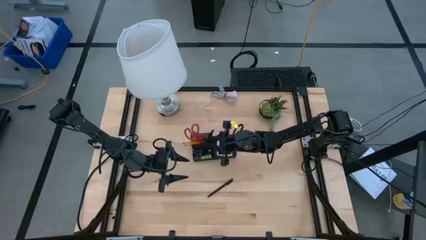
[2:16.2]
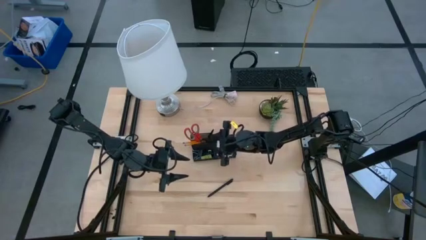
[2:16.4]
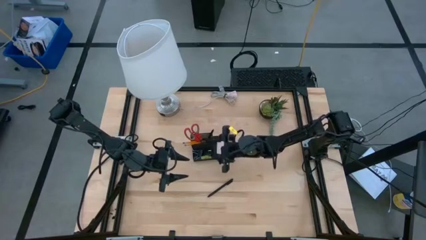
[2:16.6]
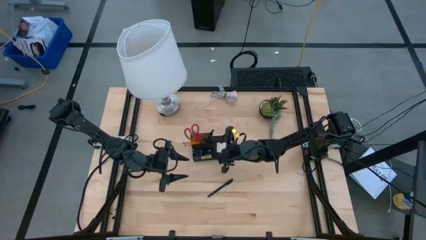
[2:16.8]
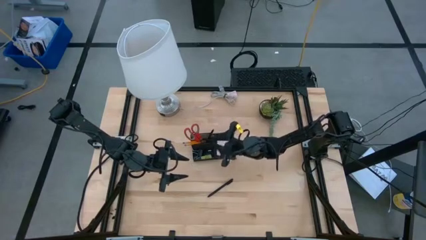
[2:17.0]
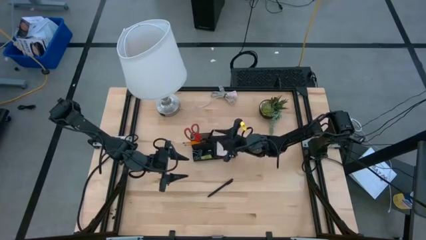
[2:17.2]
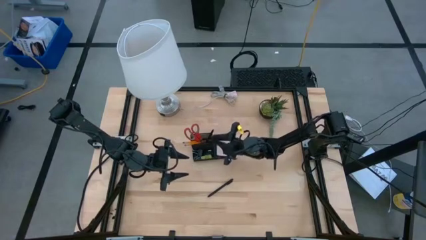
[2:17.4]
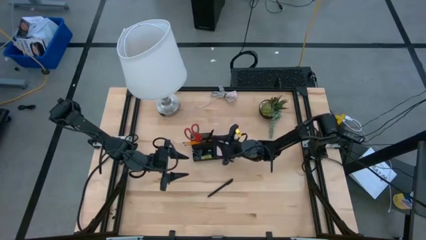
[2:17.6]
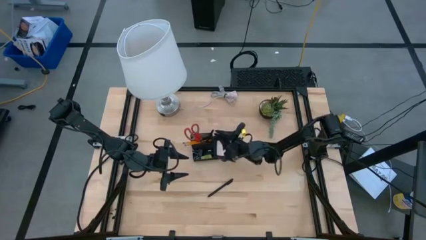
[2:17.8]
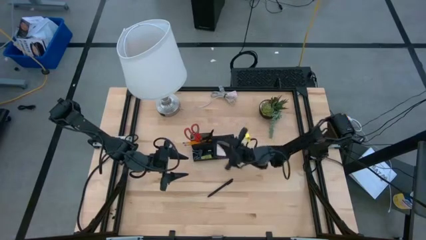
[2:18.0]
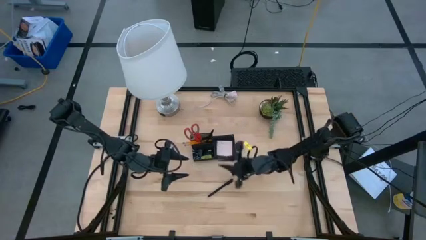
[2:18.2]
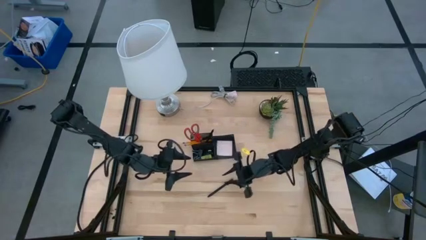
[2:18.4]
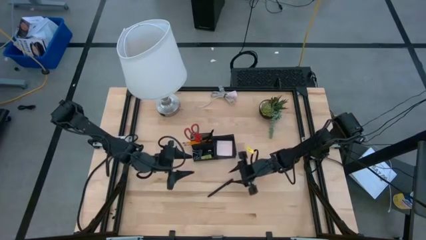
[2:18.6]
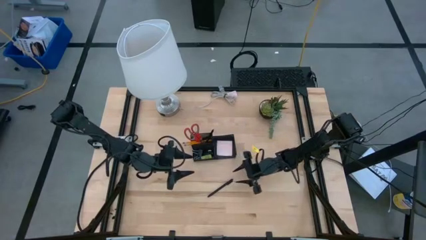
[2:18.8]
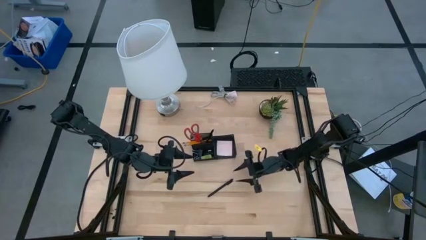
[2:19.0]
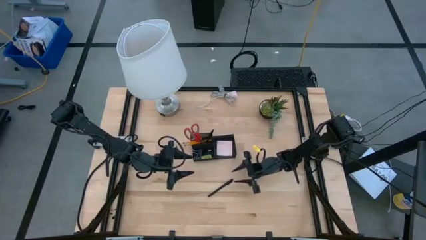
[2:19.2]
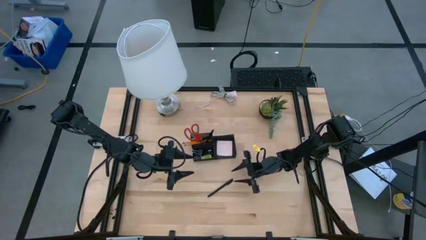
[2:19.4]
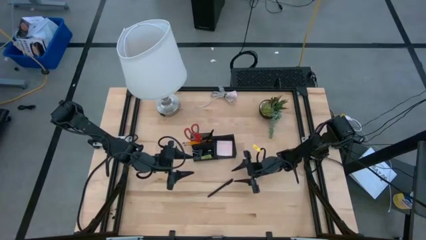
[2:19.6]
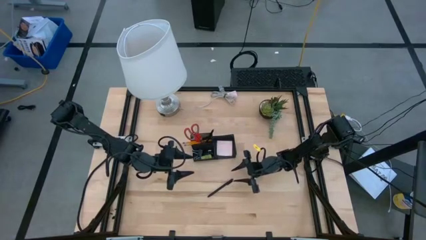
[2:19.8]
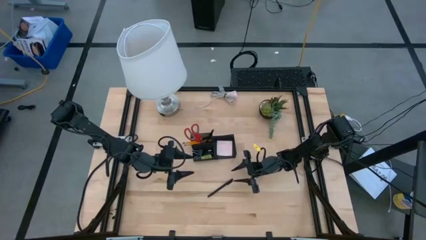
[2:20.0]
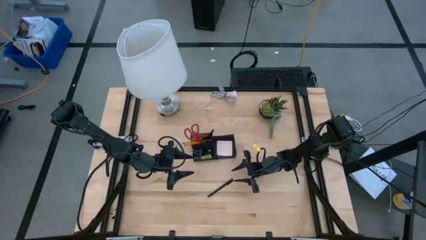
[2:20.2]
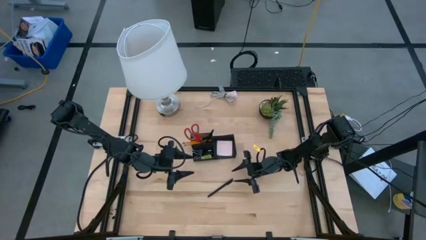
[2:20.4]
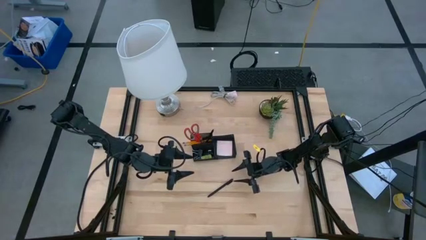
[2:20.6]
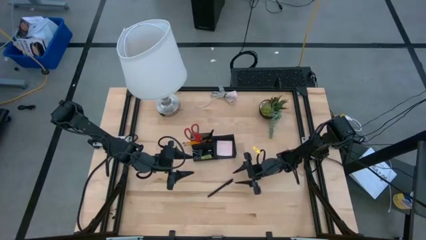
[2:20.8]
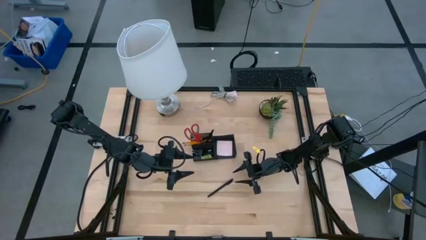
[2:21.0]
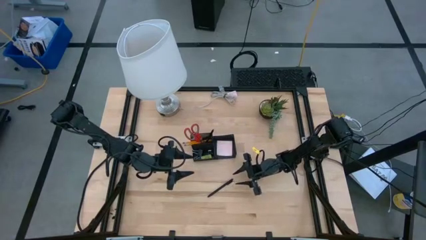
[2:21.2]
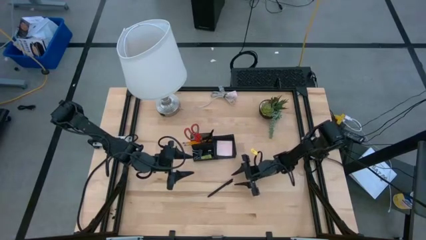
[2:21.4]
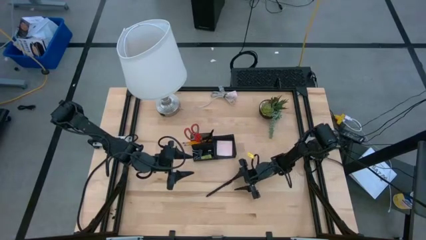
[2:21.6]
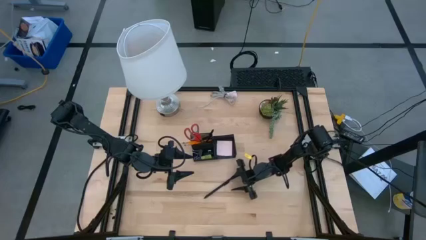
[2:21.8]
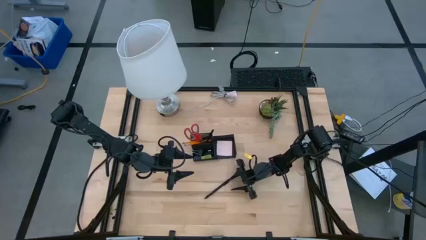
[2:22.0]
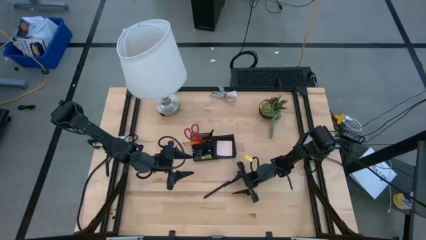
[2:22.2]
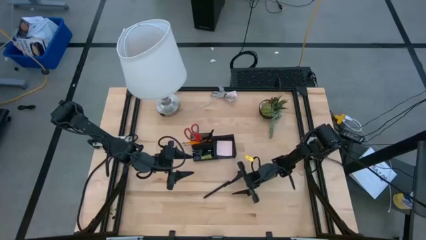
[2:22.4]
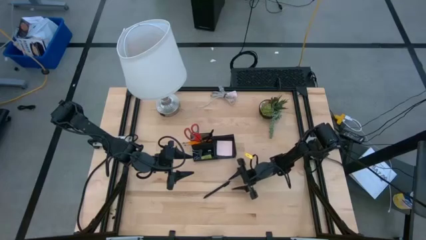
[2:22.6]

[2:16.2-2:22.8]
Task: Pick and place office supplies into organizer
Put the black pen into the black desk organizer

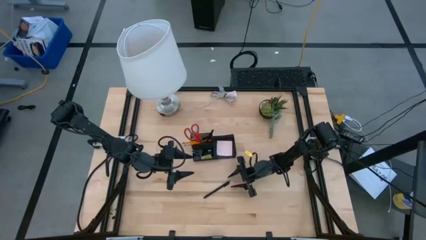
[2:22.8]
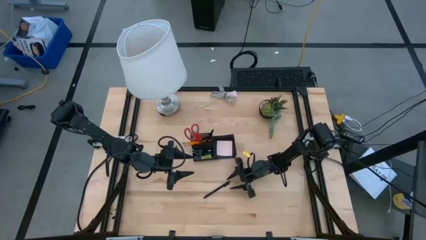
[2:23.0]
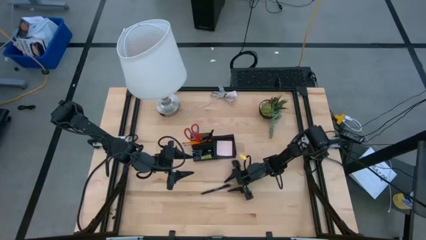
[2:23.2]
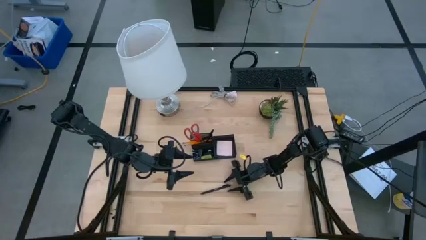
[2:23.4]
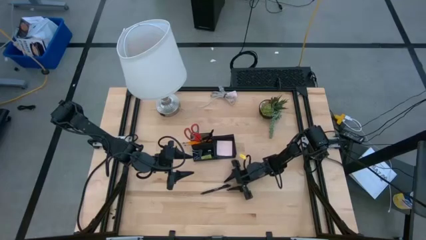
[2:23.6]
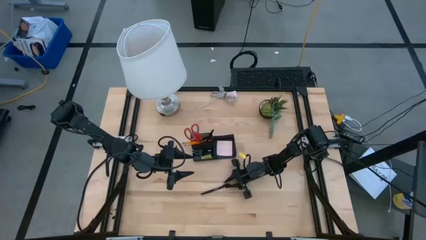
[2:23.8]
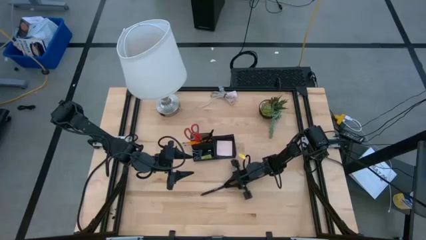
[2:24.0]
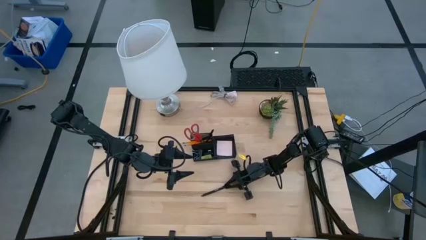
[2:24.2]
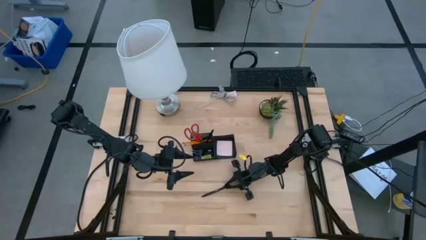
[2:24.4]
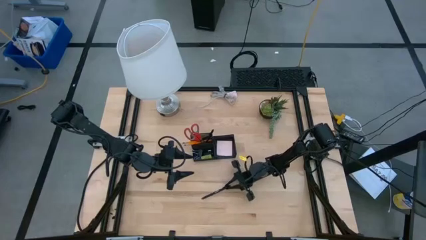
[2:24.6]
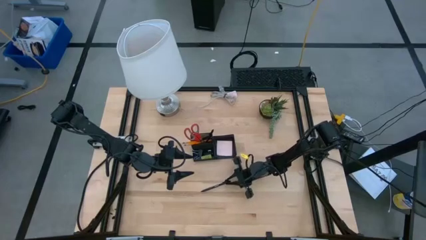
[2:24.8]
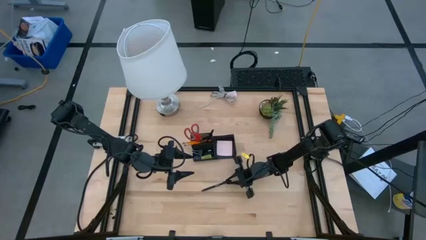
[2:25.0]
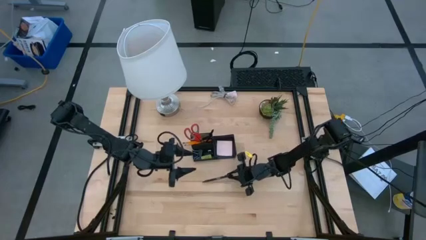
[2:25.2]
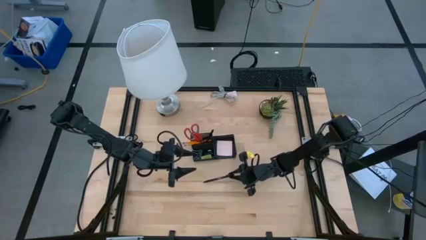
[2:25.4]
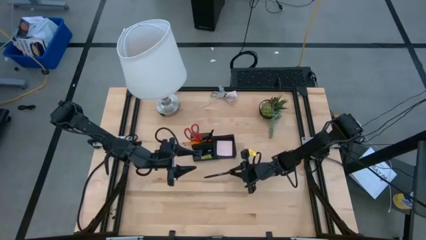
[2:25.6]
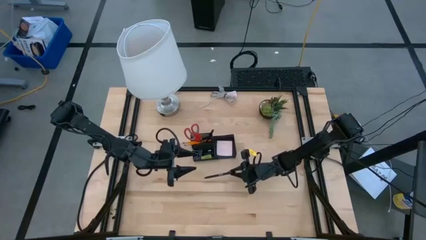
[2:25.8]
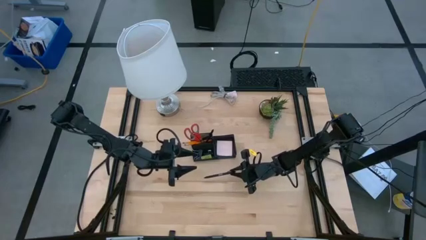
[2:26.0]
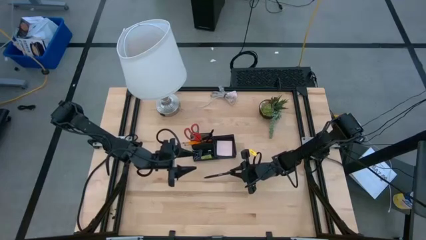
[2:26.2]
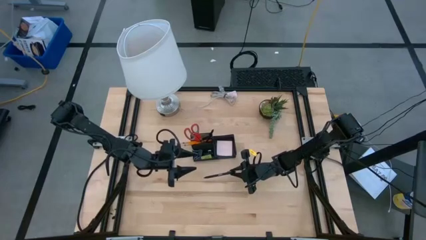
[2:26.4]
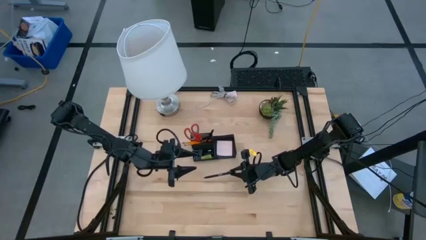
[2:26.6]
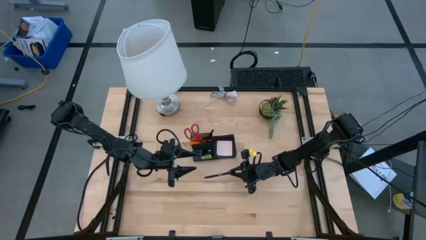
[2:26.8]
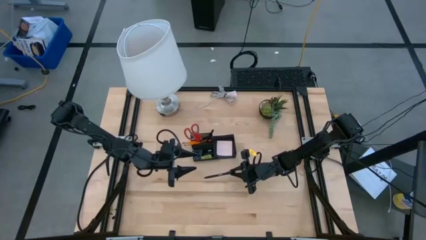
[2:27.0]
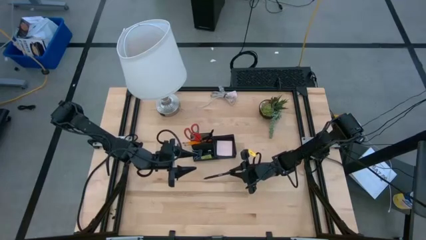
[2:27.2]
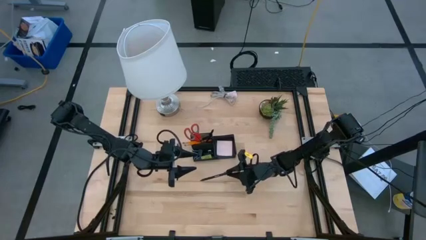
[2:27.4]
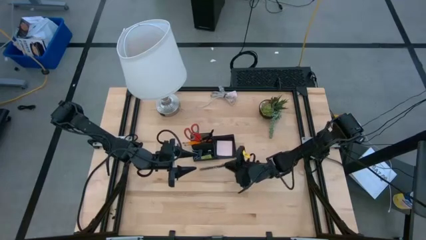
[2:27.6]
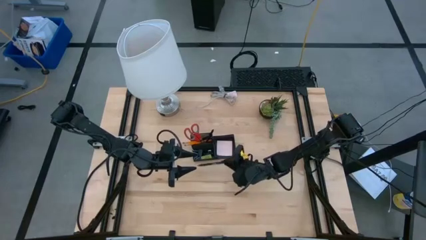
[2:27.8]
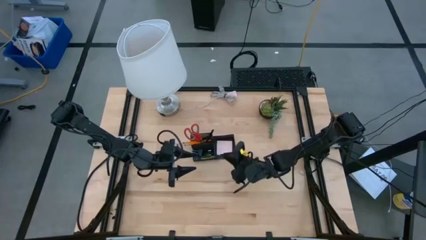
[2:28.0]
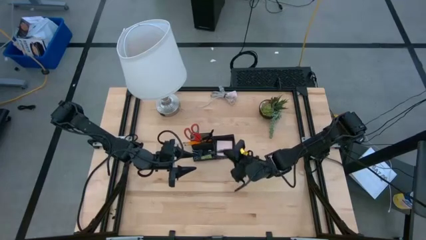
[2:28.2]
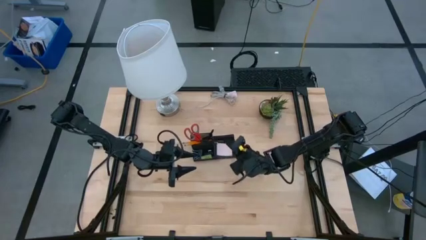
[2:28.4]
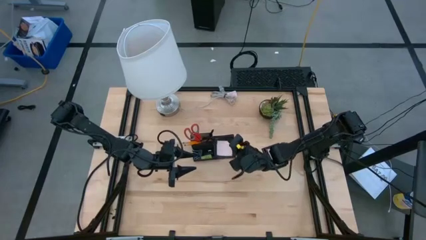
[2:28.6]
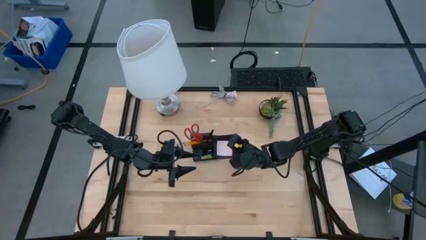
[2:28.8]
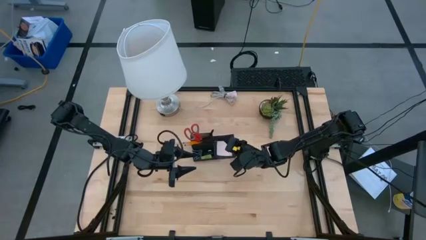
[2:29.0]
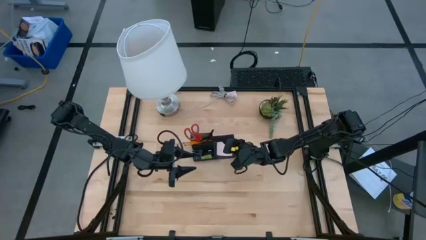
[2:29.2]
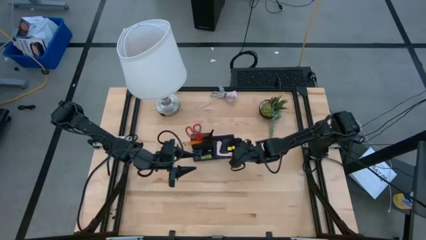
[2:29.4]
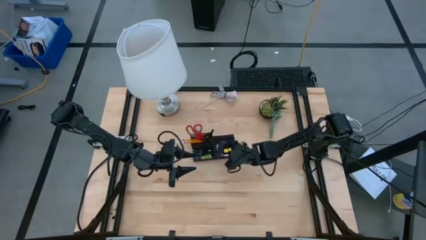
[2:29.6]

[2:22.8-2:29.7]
Put the black pen into the black desk organizer

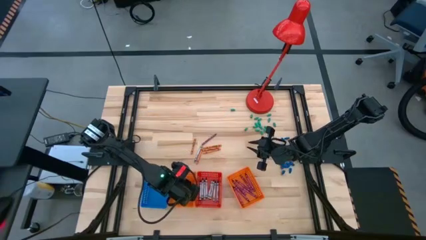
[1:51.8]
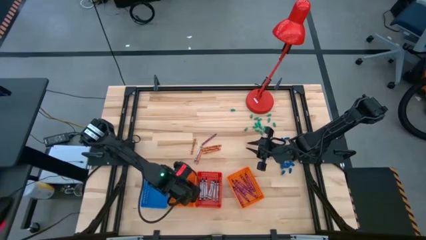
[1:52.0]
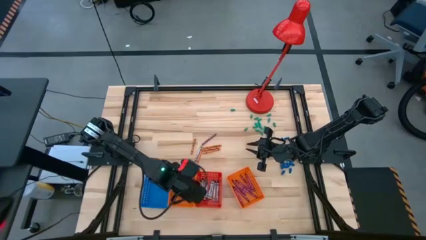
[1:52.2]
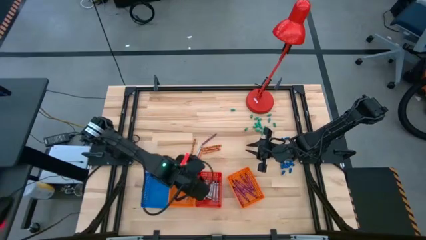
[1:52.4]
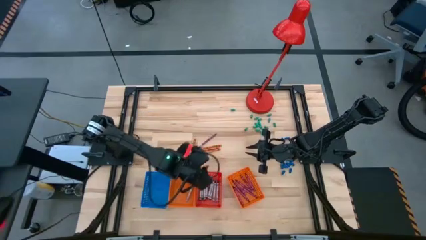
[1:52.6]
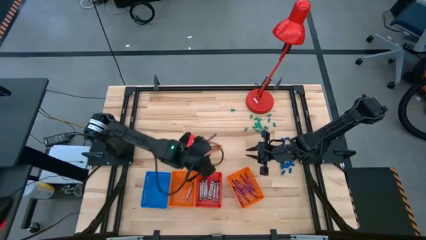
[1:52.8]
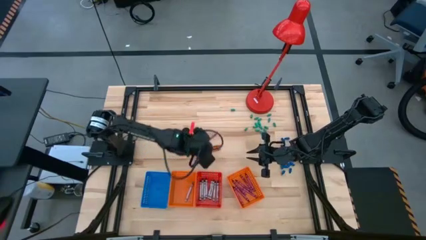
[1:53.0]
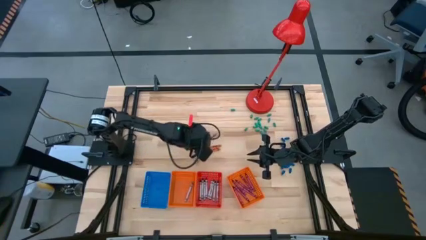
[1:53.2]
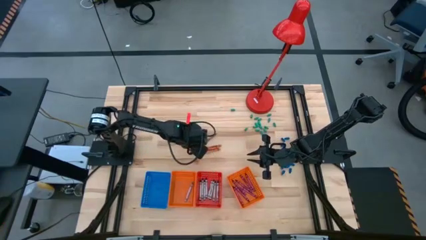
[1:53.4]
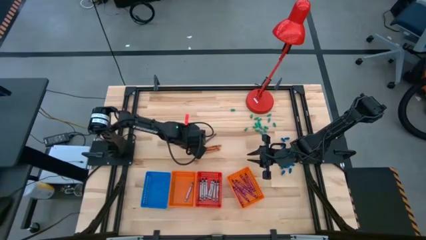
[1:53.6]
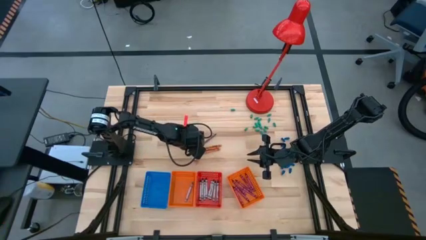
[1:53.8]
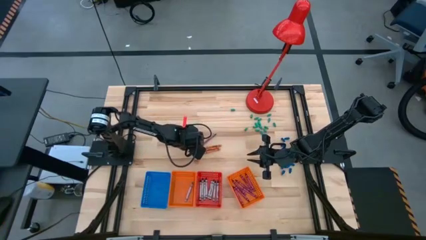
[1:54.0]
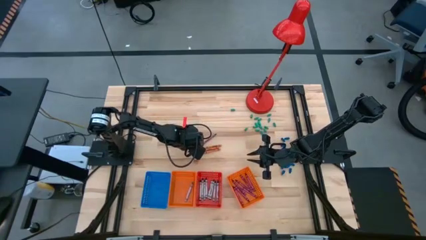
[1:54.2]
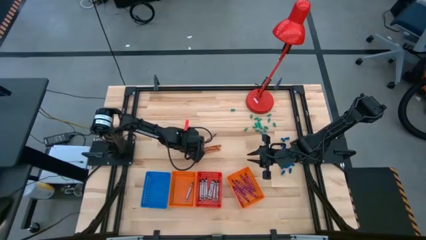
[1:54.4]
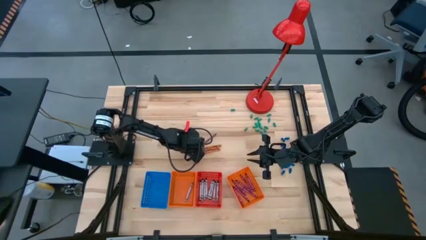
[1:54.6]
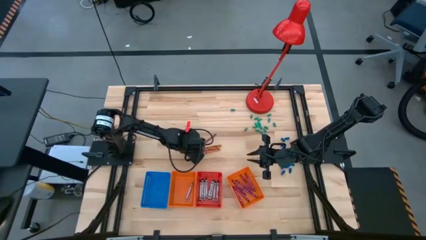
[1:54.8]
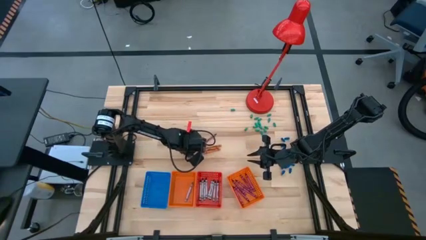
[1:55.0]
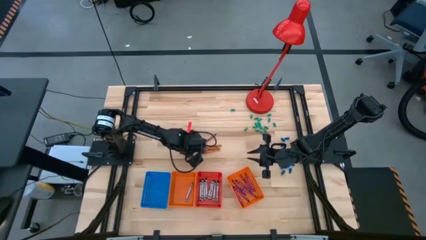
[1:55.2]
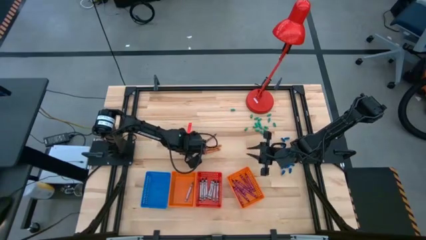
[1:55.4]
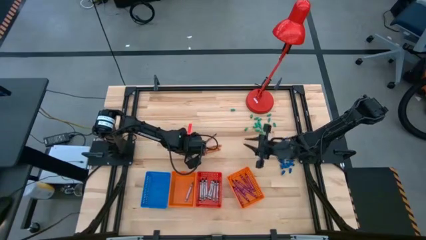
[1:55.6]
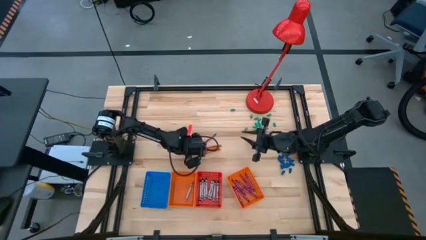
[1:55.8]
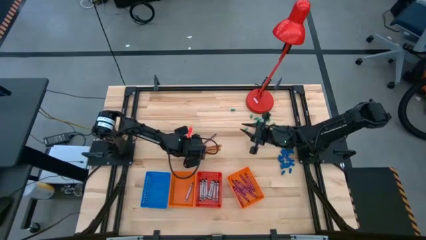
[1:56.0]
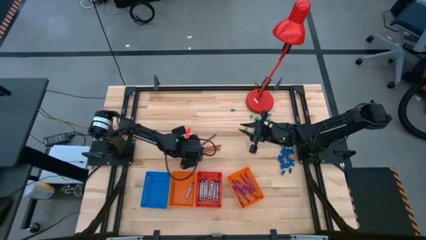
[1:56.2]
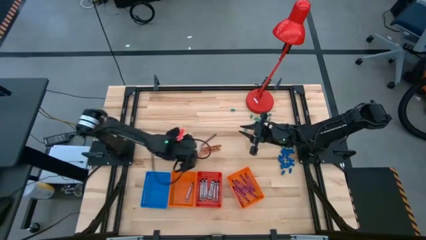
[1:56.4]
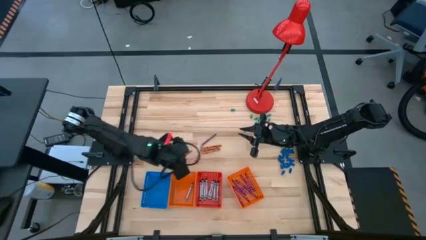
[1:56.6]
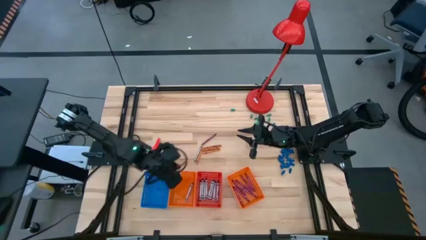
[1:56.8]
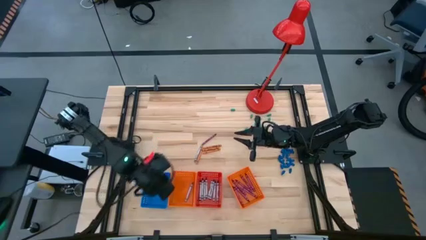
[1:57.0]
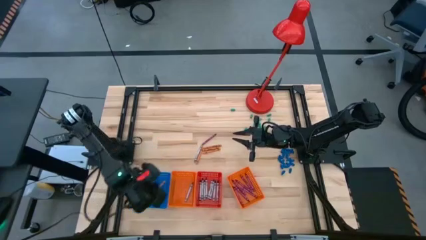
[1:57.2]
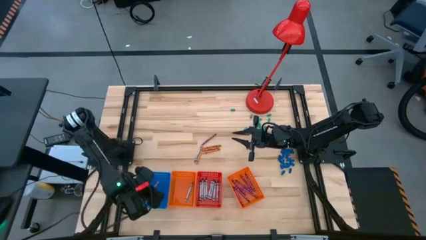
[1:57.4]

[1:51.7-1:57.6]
Task: Sort crayons
Put the orange crayon into the blue bin
